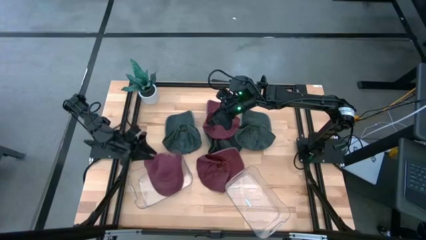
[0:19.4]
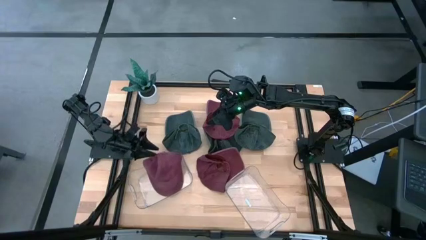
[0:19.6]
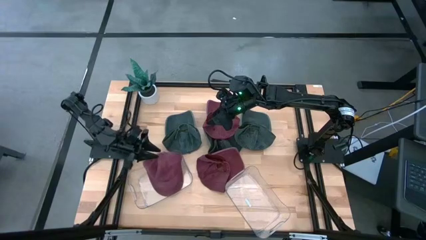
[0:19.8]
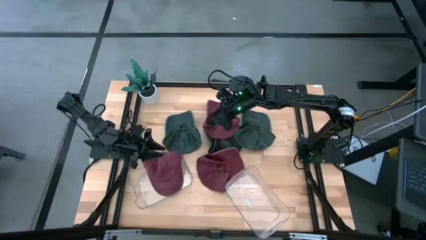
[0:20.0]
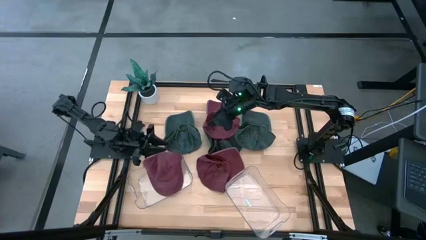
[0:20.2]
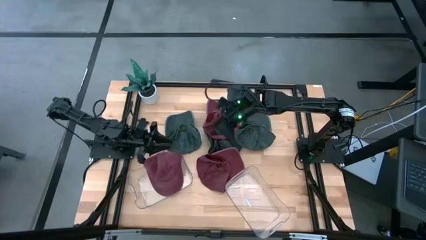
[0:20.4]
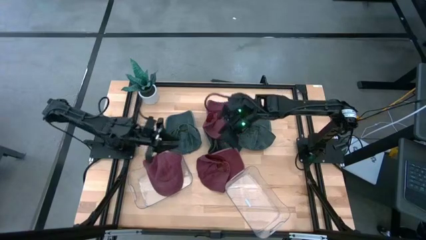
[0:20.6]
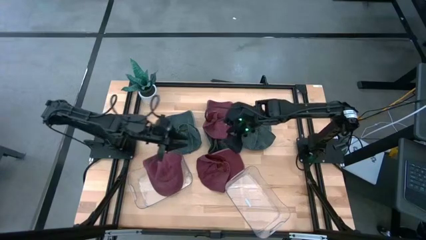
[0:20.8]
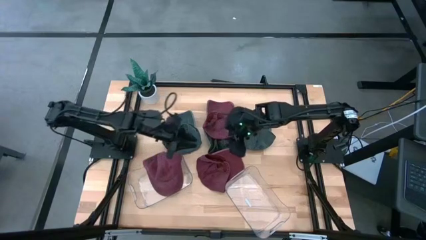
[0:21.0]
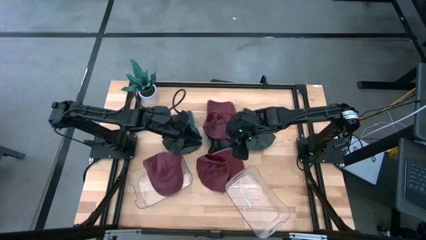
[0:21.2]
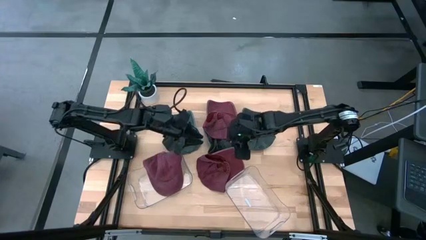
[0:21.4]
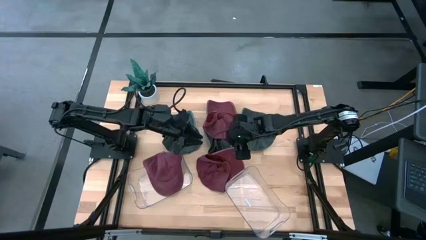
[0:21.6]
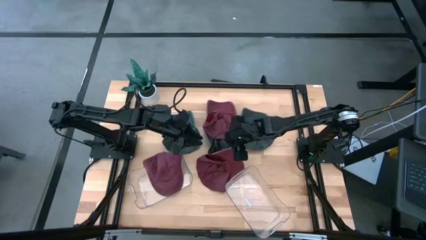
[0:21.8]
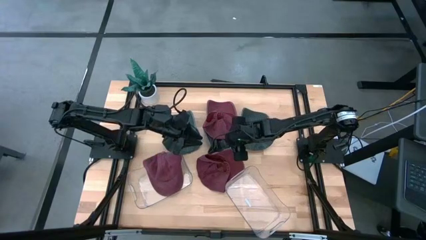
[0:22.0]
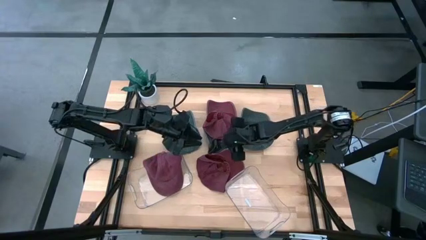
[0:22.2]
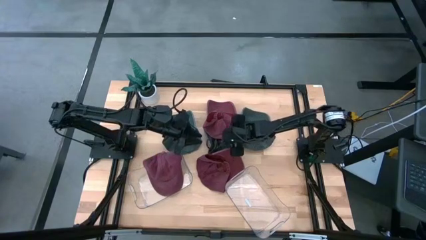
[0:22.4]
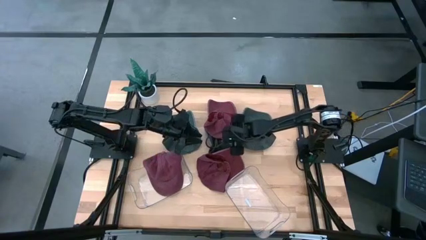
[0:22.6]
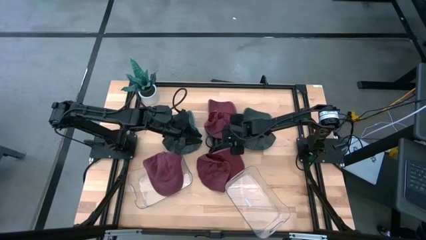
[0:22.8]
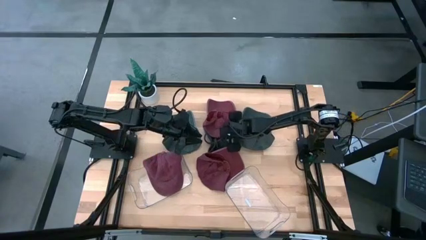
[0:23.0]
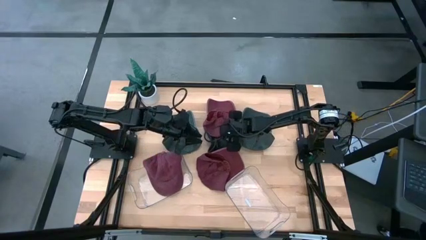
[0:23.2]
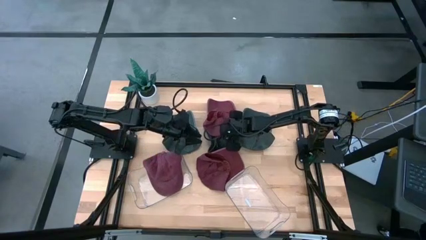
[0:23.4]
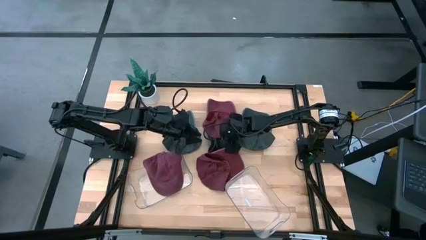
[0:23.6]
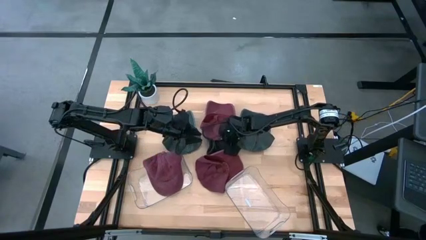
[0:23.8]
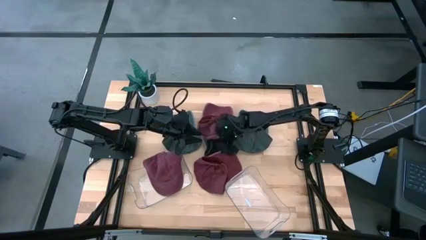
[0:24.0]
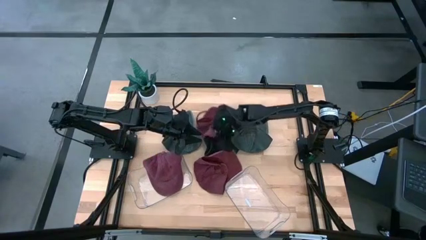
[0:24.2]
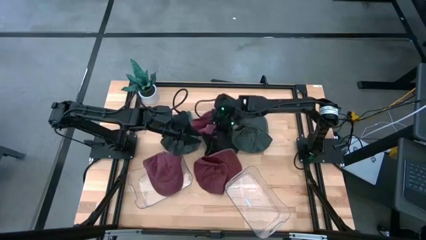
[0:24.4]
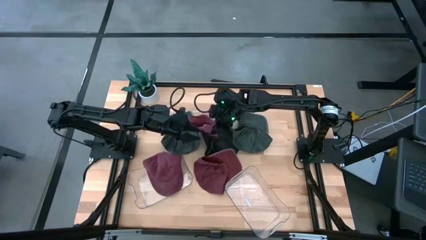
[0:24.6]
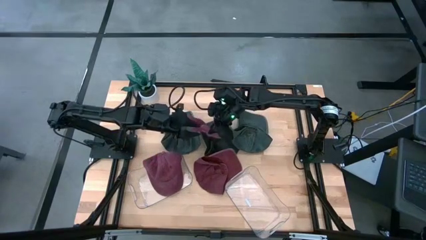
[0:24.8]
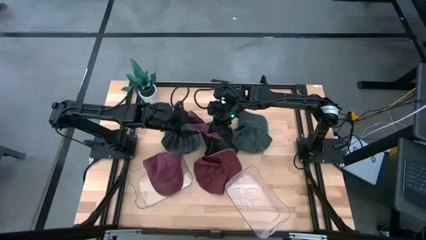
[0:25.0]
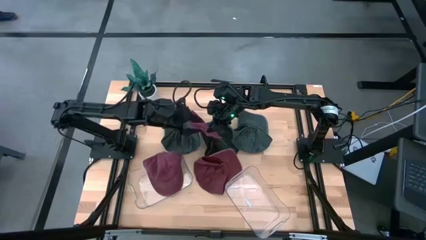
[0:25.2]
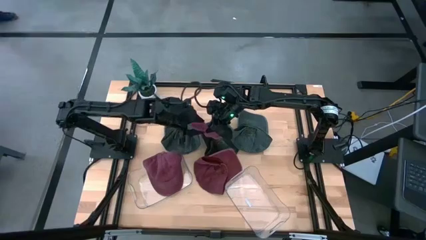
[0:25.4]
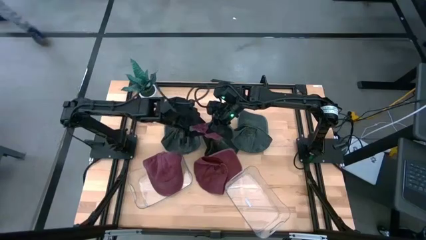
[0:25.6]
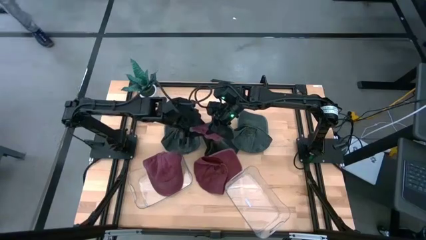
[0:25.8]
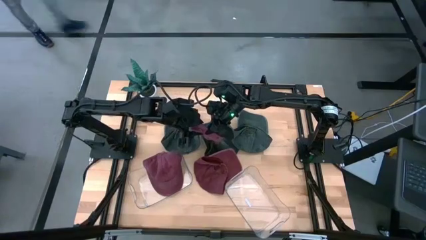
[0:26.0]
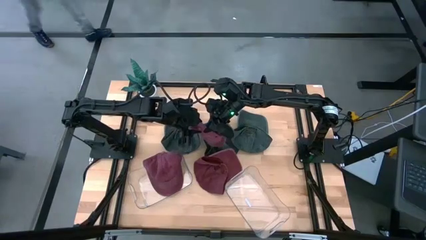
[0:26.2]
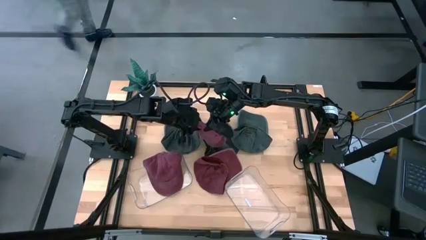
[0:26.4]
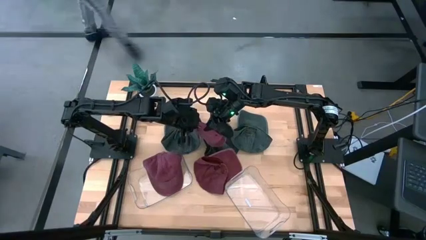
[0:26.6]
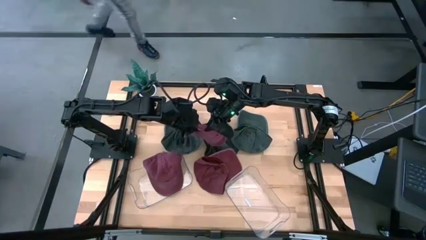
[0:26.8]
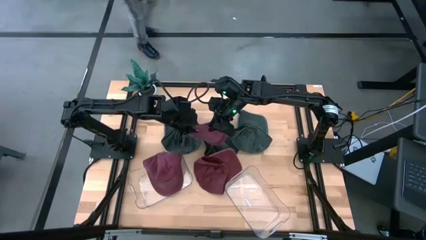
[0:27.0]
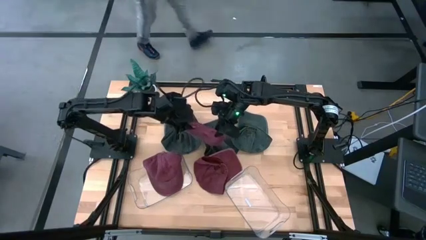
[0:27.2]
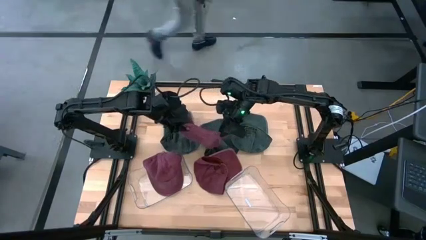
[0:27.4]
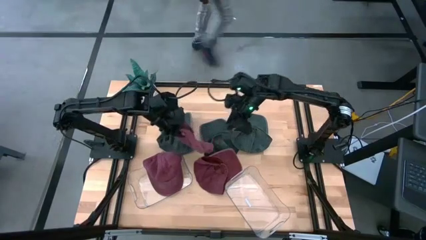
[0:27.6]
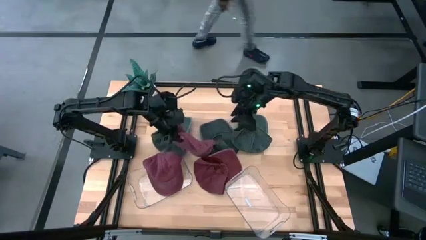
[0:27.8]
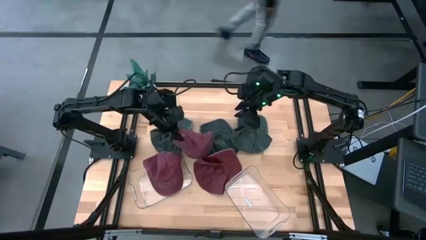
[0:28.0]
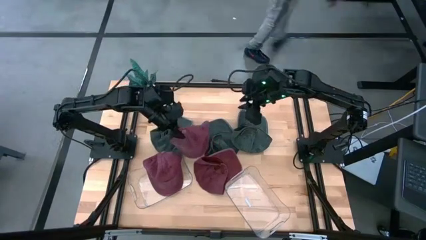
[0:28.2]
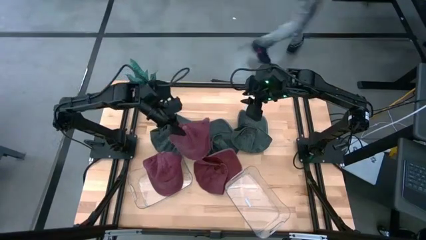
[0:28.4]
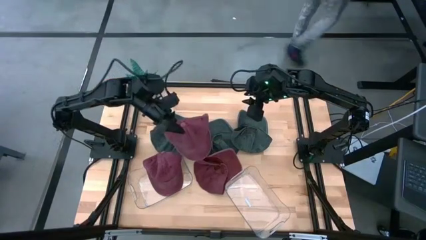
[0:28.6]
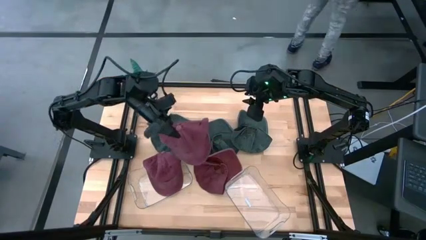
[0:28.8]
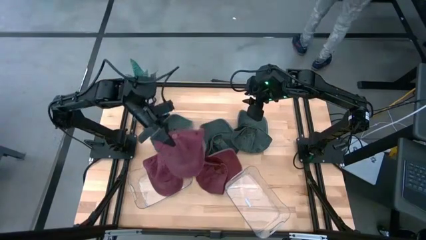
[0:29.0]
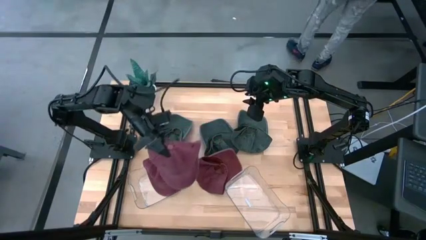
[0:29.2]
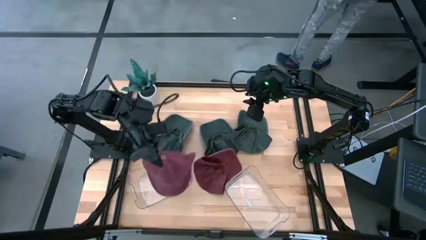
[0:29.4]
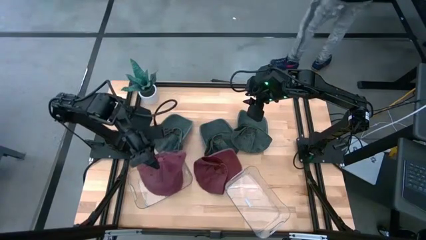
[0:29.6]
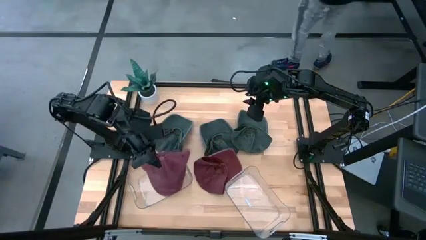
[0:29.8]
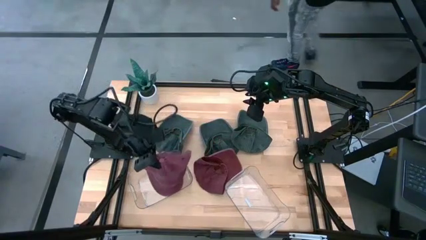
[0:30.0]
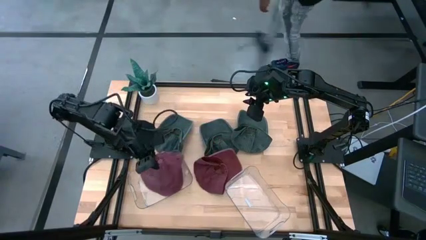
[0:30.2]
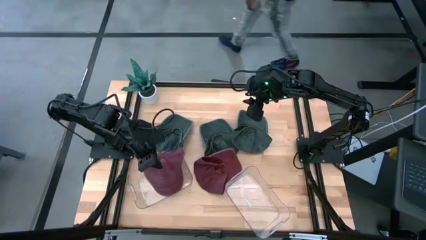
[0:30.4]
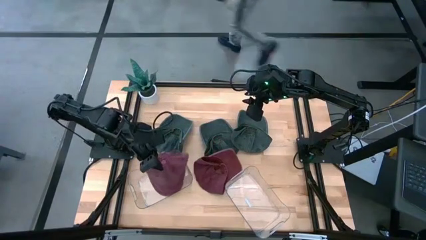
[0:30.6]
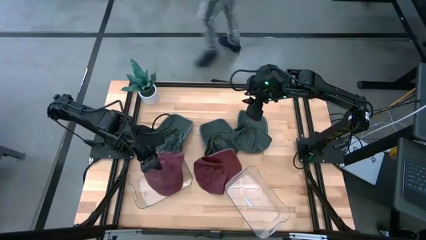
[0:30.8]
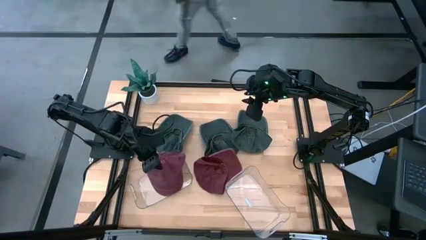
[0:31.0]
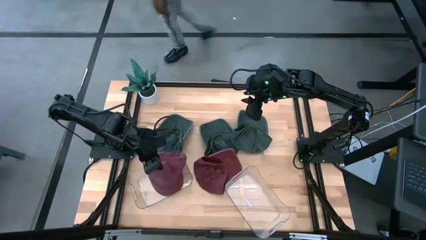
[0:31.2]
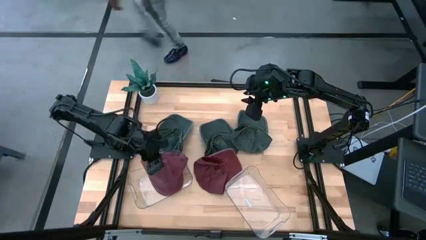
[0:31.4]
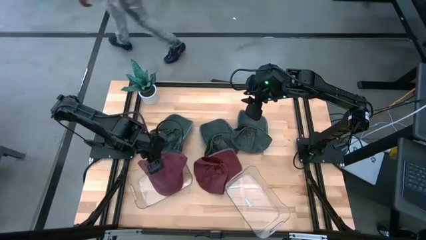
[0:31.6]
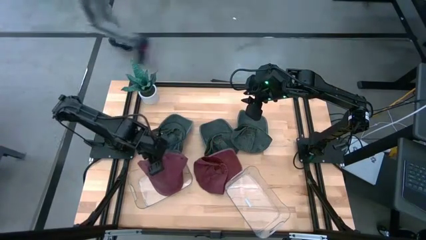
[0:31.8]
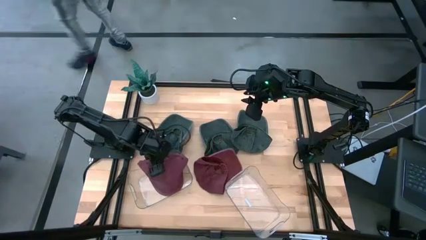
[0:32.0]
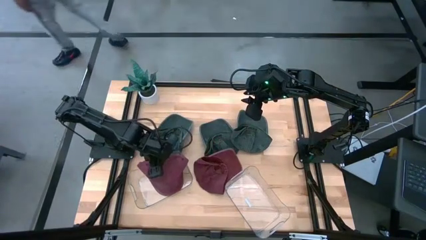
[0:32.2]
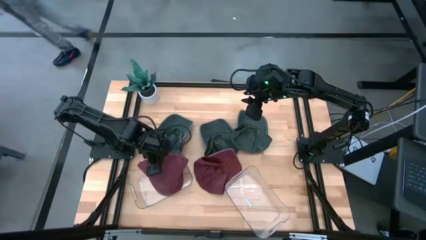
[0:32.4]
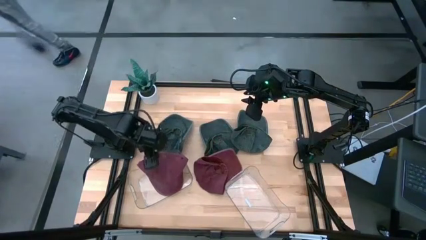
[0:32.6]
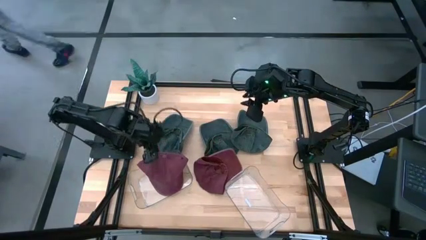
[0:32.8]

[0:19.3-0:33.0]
Task: Pick & Place hat
Put the top red cap into the left transparent bin
